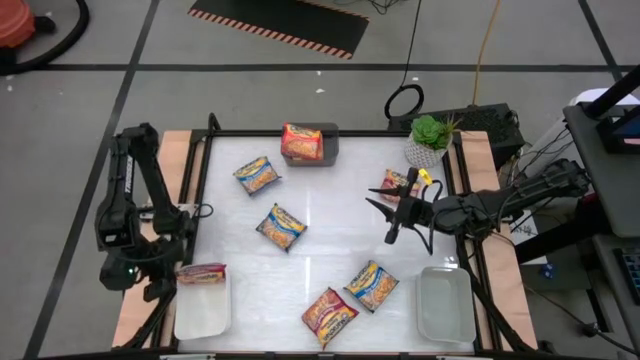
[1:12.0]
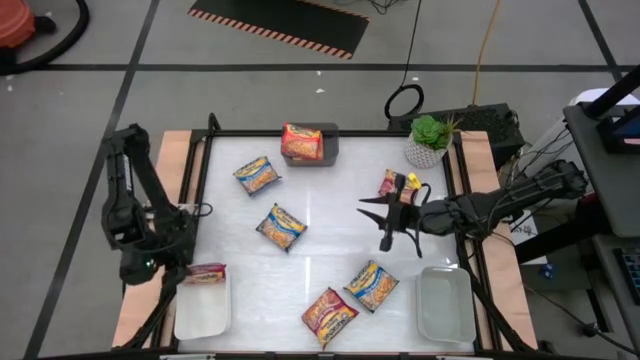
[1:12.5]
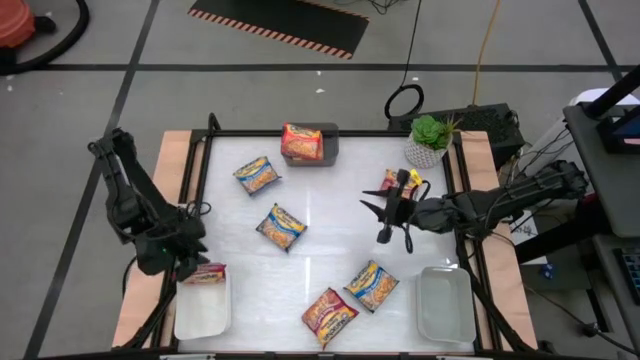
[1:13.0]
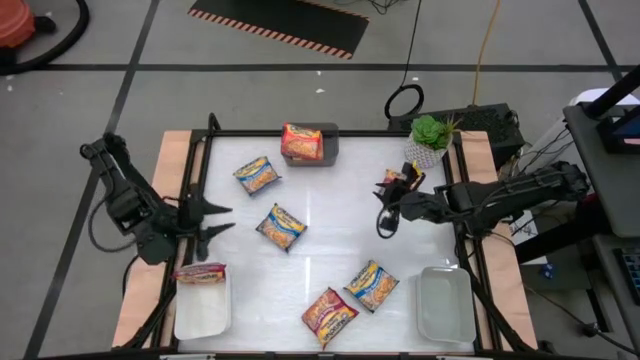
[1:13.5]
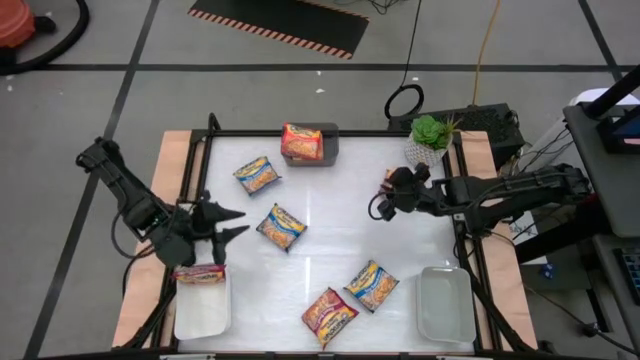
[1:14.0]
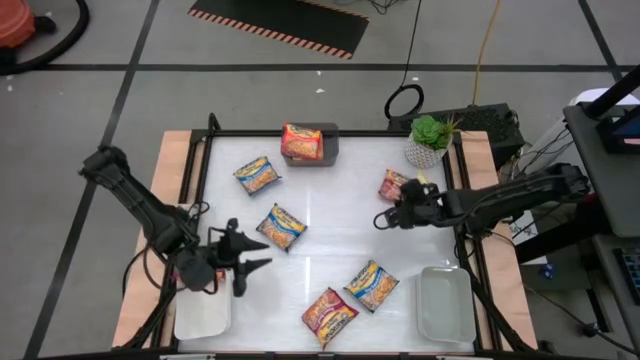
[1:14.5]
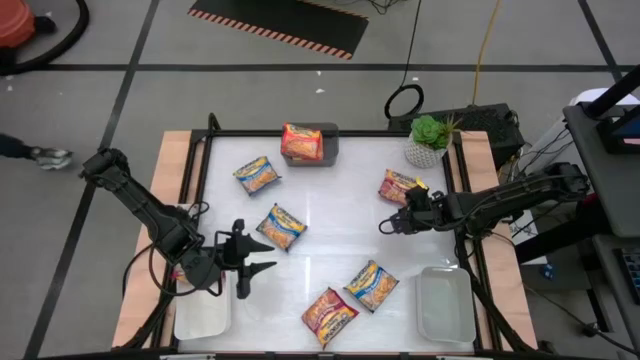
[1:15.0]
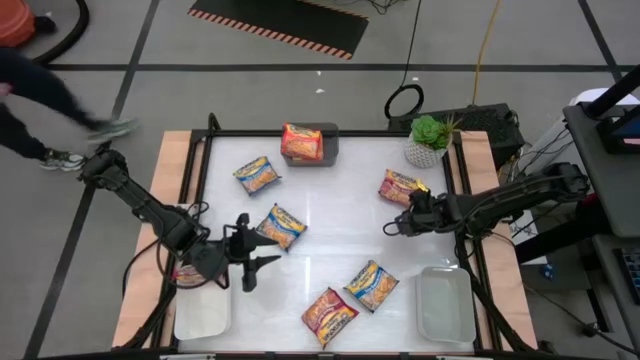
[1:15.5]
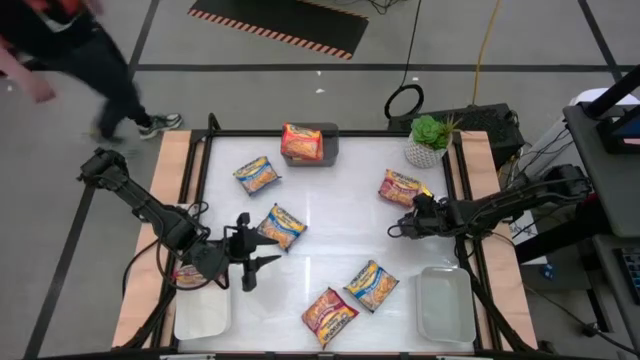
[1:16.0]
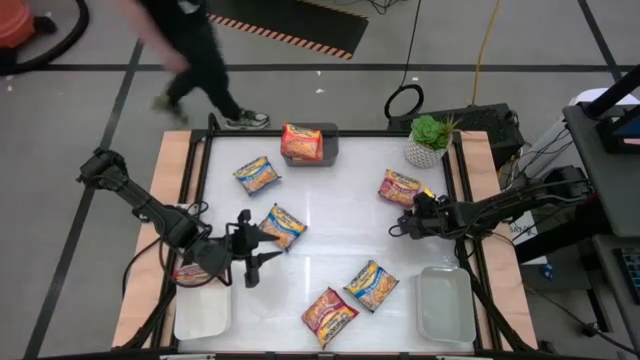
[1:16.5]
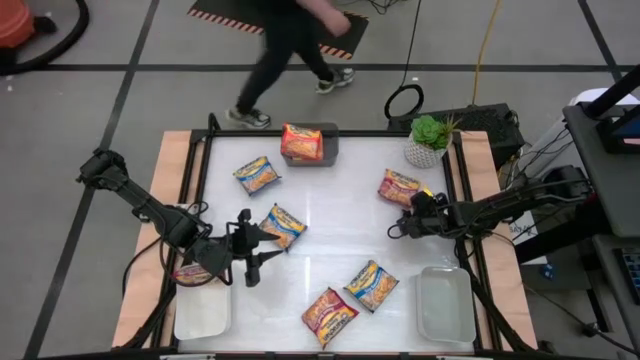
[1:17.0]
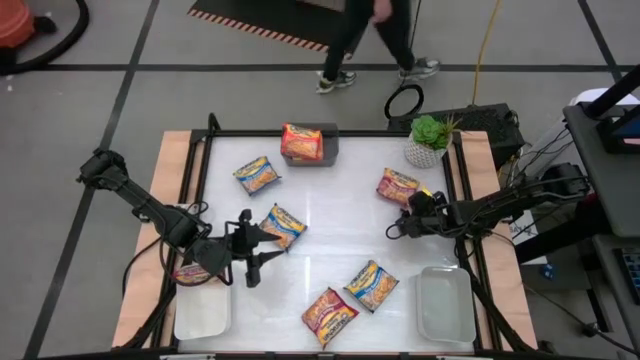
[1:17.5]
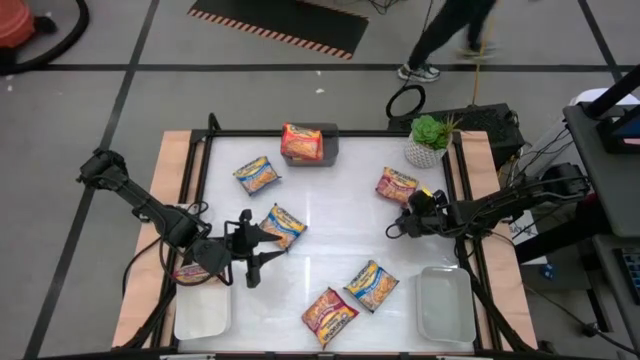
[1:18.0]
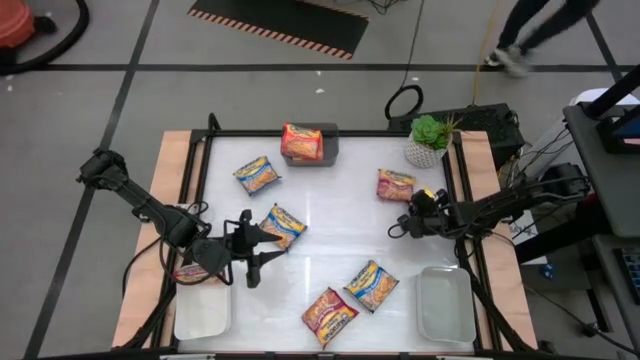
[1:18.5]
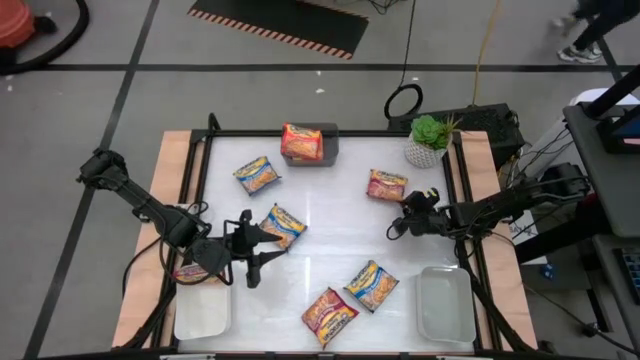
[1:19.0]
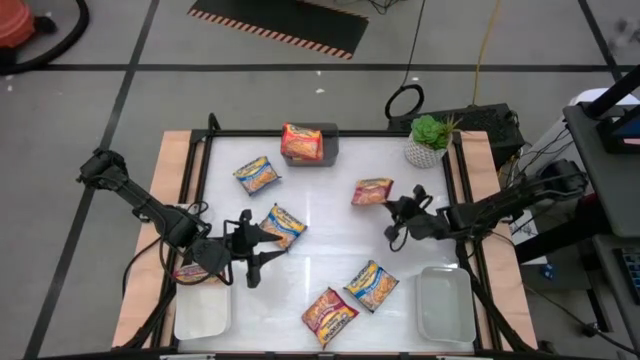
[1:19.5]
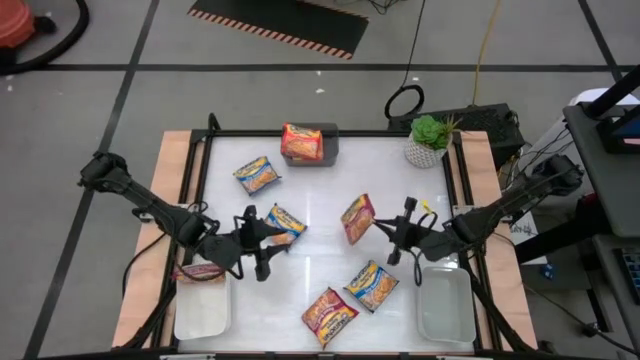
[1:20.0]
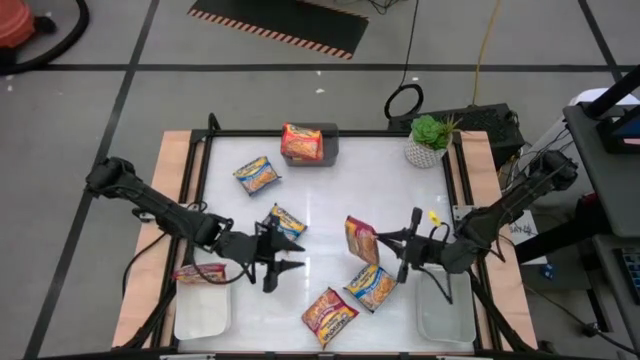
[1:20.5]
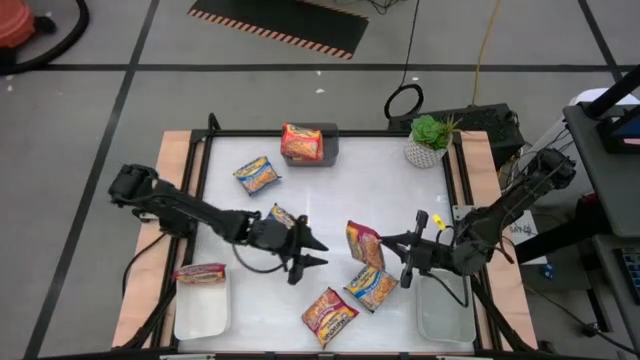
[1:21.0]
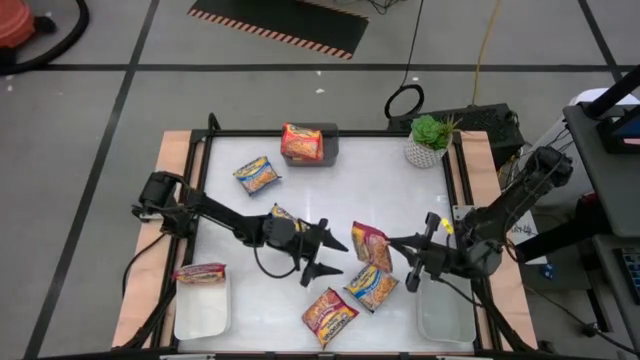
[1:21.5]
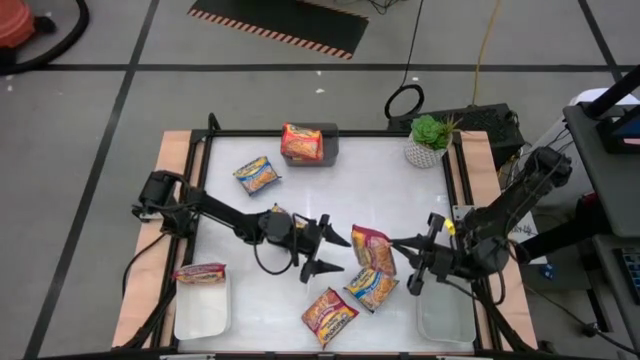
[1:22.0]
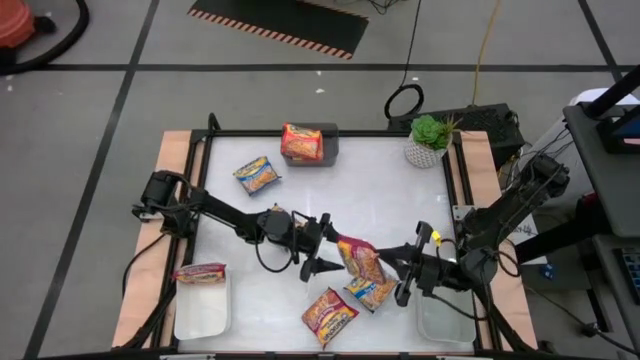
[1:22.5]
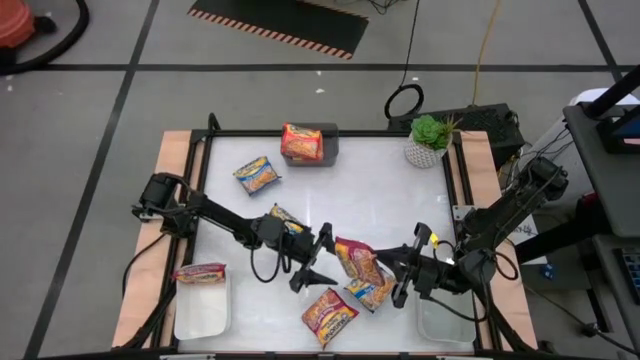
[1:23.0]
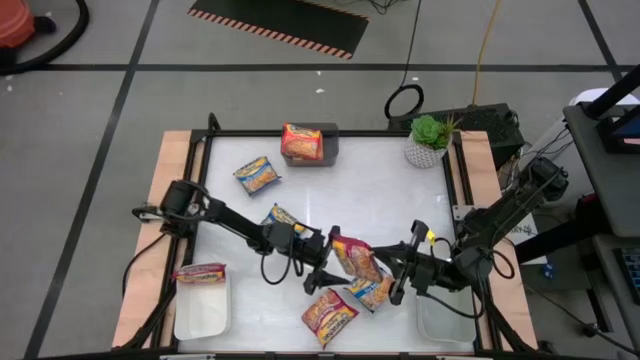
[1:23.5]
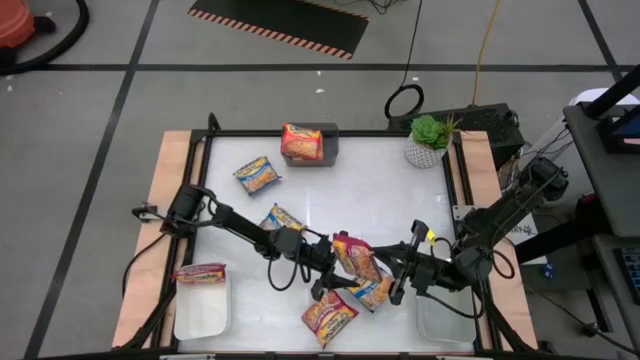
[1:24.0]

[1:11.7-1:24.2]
Task: Sort Maruchan noodles
Put the top red noodle pack into the white bin

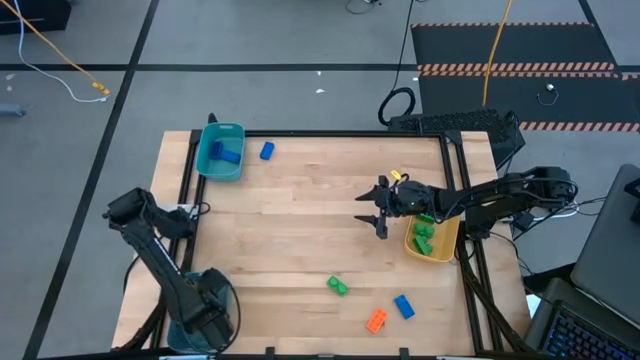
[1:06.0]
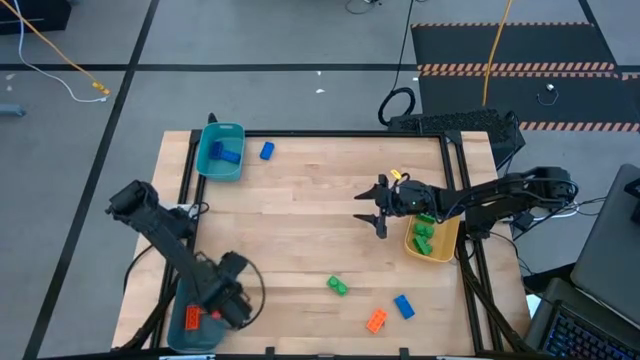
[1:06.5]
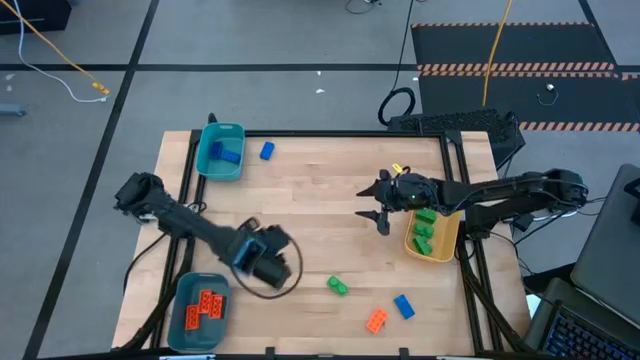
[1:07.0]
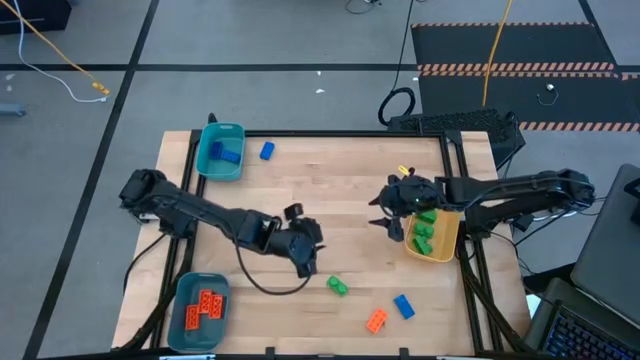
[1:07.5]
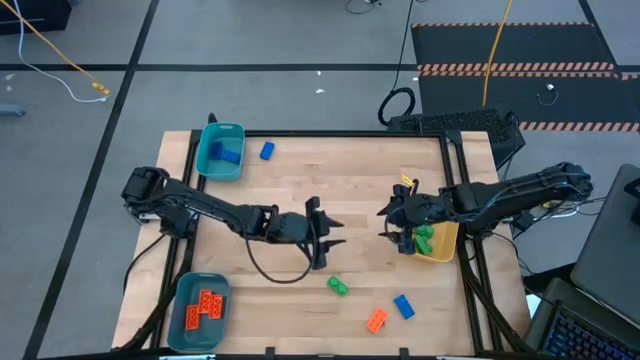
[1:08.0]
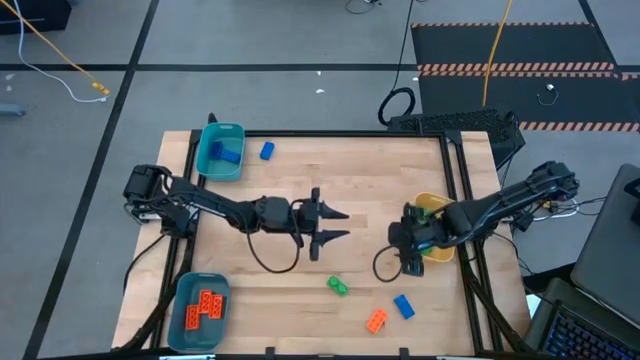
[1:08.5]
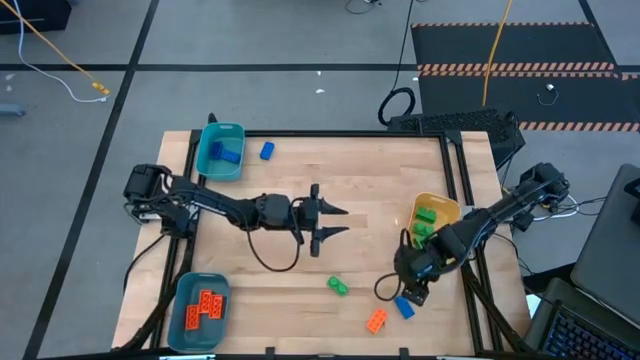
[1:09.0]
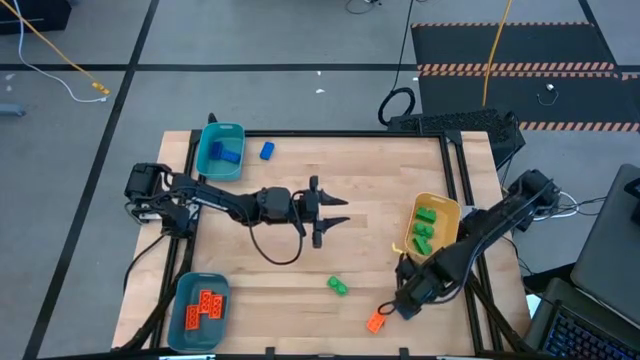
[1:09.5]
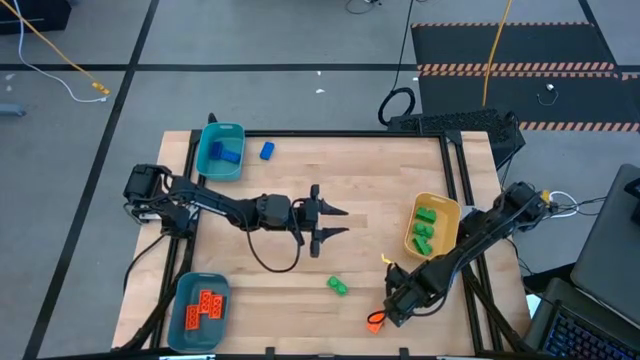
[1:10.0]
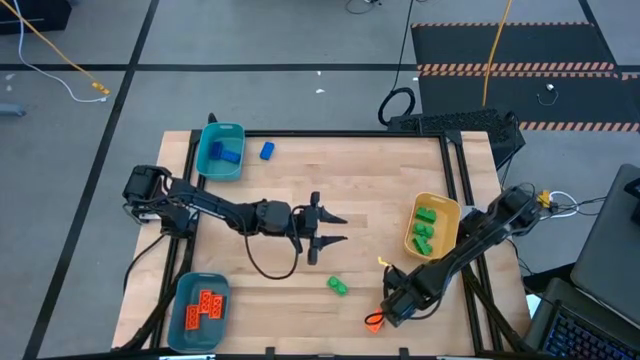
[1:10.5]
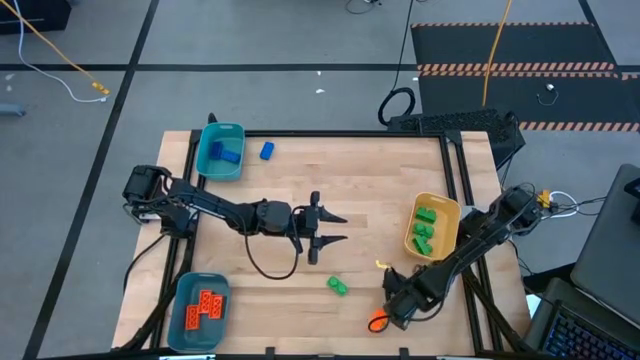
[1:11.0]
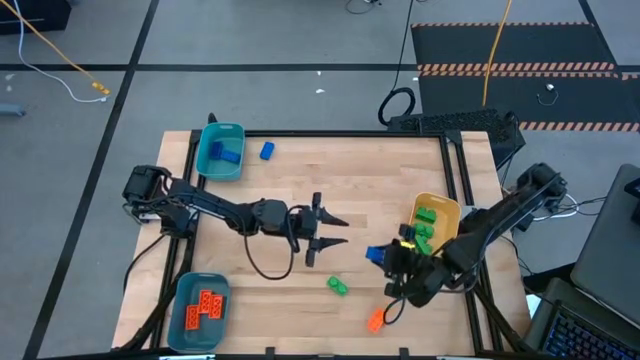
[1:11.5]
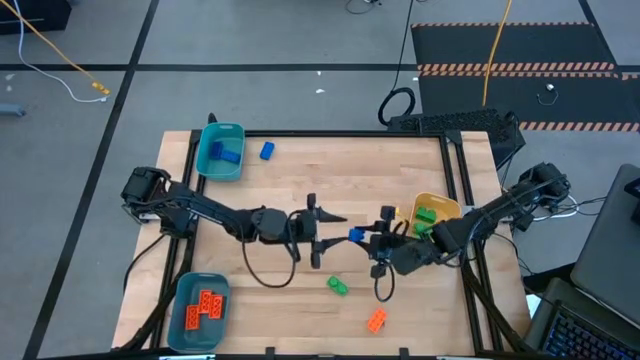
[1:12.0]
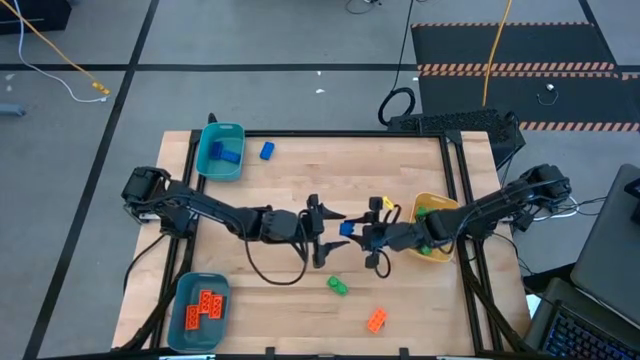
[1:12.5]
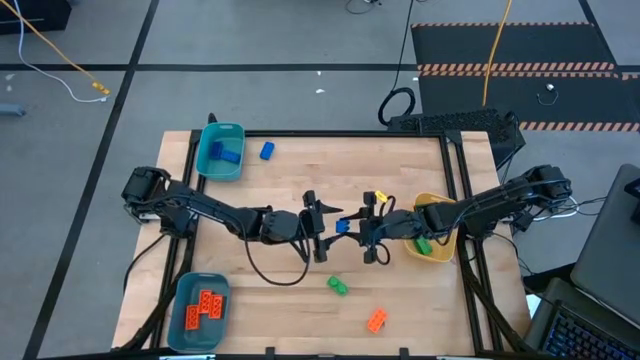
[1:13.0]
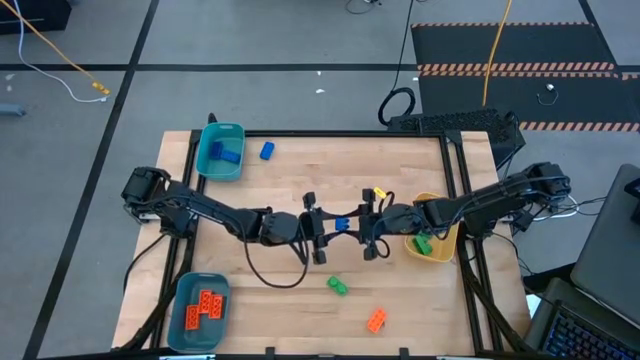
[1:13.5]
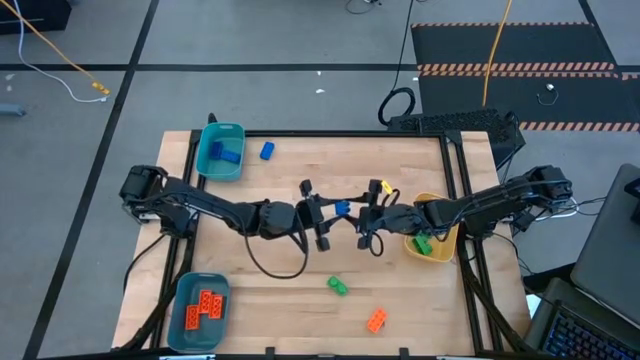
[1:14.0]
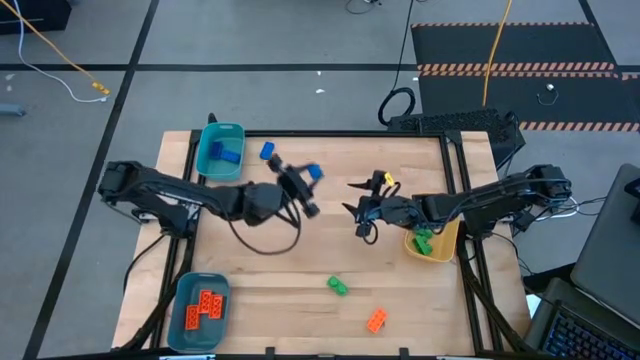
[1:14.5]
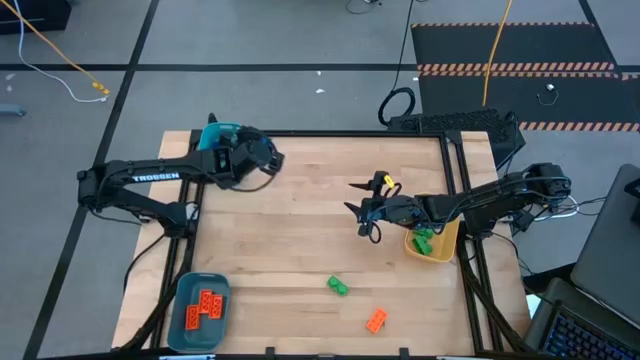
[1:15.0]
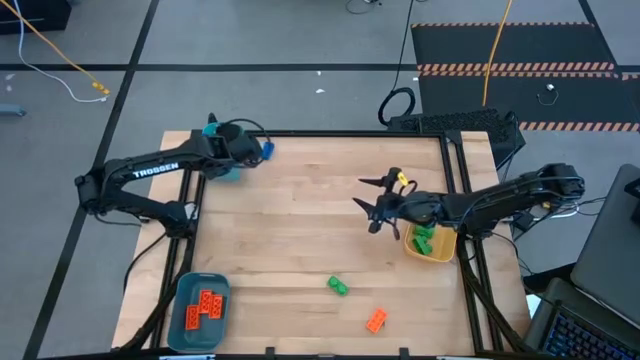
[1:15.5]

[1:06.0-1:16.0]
Task: Sort & place blocks by color
Put the blue game piece into the light blue bin
